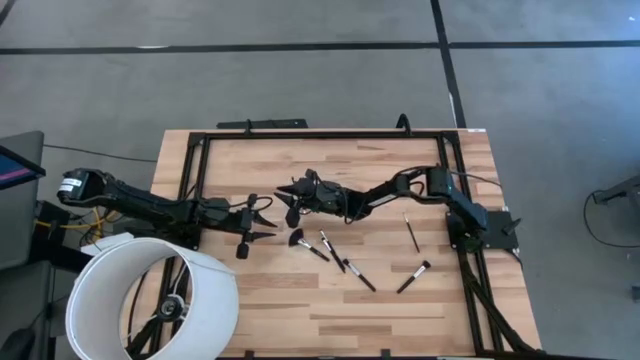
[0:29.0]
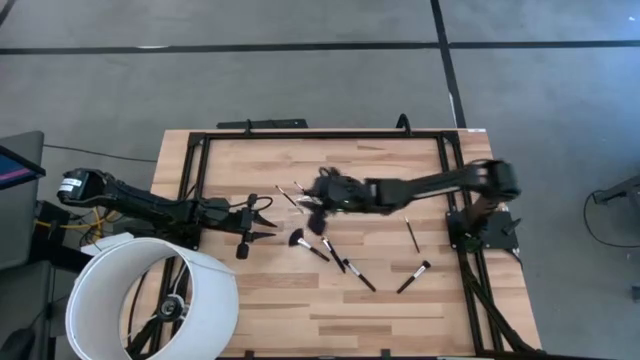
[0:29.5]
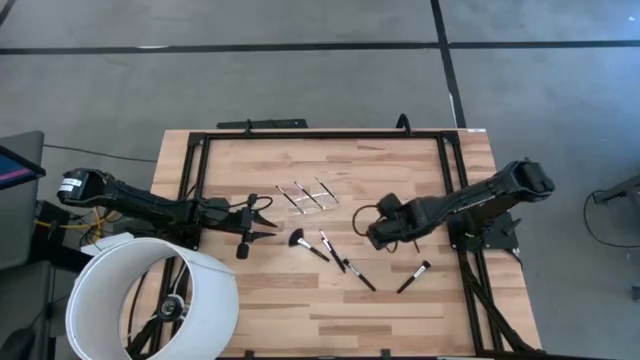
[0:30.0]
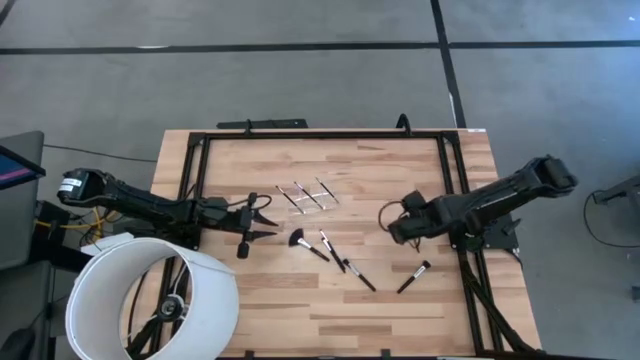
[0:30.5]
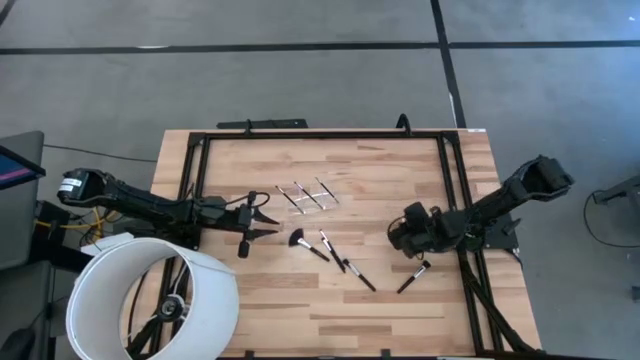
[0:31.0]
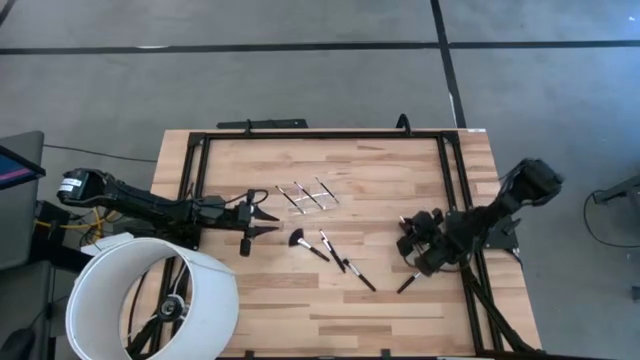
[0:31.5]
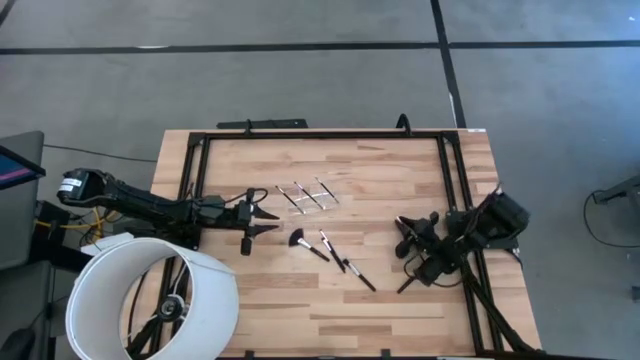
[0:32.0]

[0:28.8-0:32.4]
Task: Put items in baskets/containers
Put the black liner brush into the transparent organizer

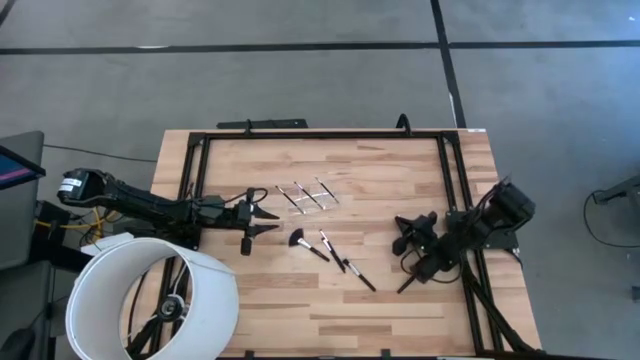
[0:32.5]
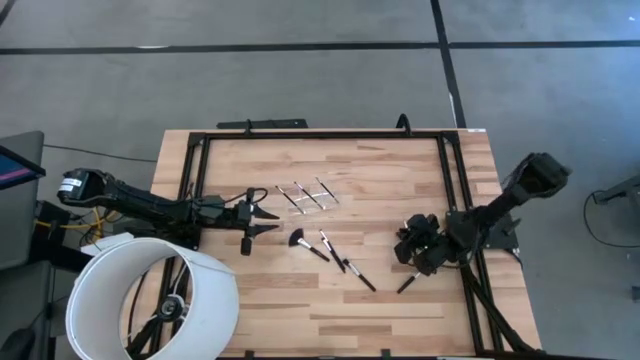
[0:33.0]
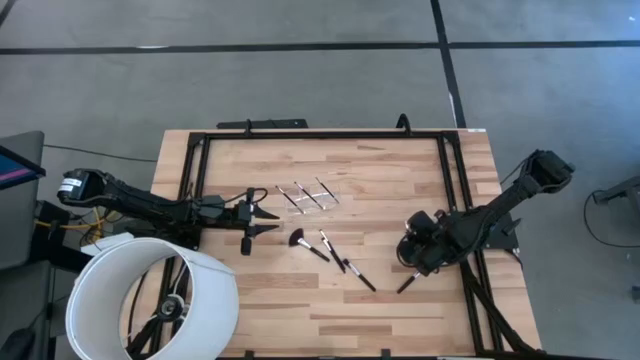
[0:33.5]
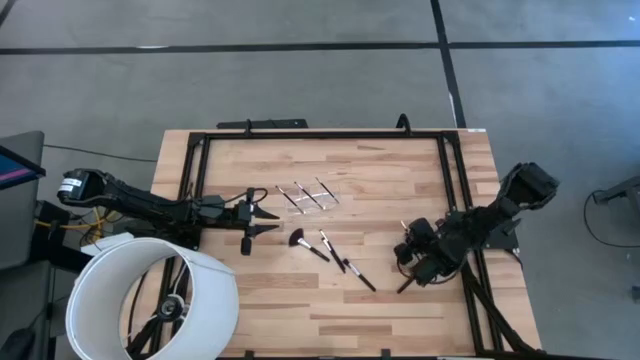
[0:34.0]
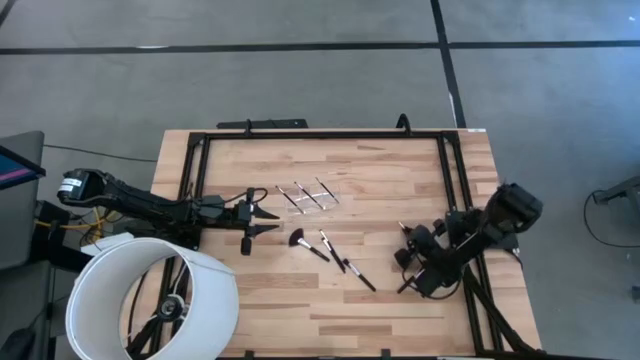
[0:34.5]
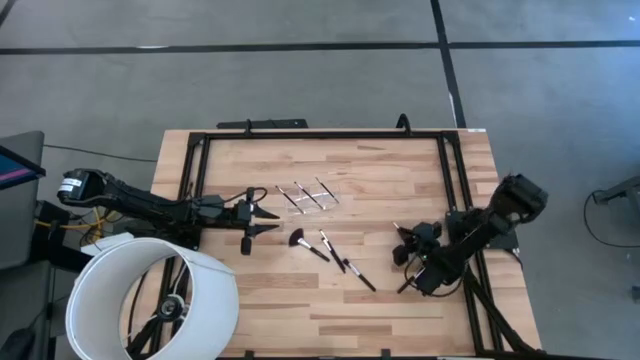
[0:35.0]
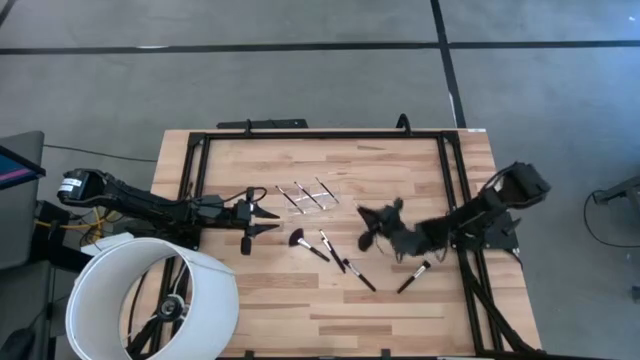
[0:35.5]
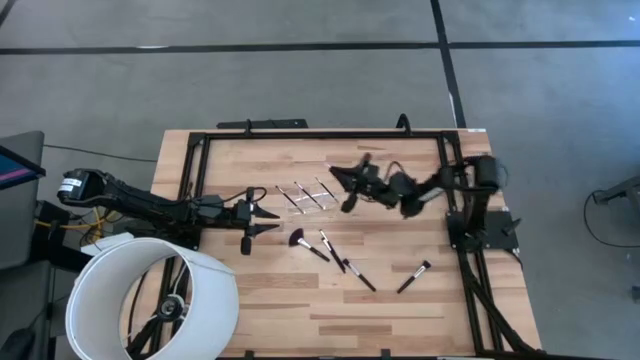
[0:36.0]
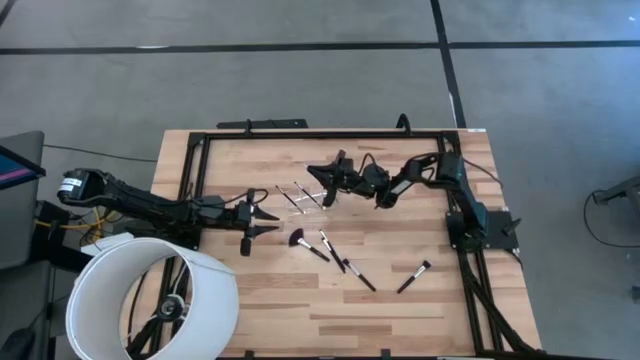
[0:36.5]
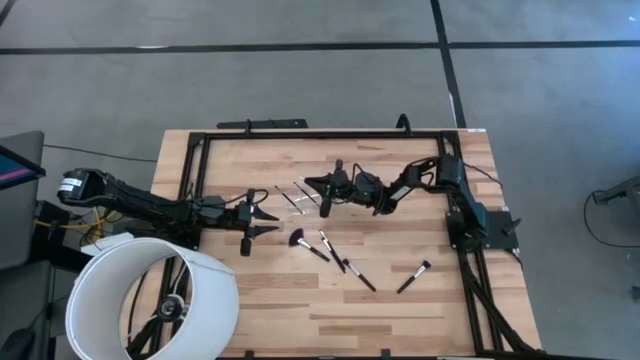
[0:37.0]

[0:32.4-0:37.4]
Put the black liner brush into the transparent organizer

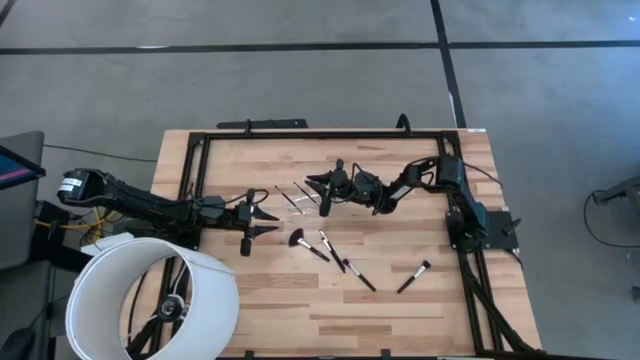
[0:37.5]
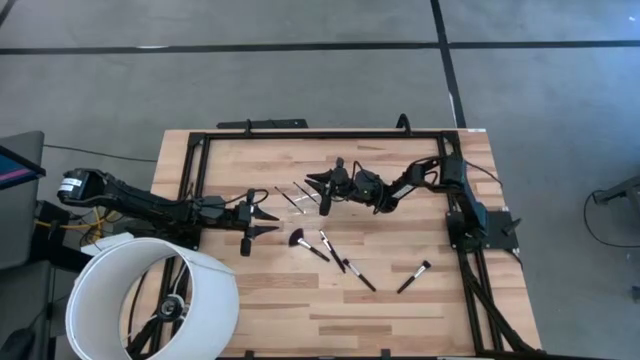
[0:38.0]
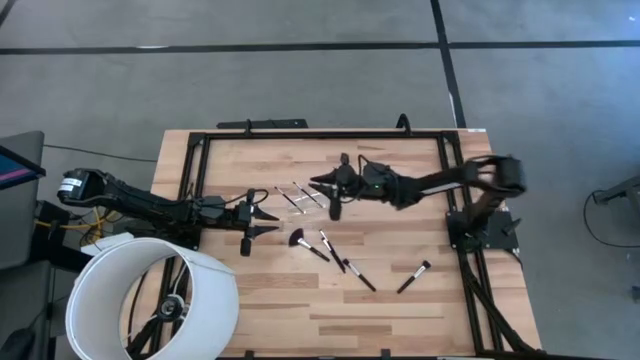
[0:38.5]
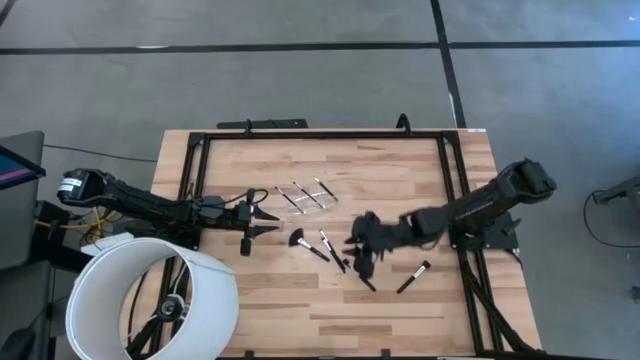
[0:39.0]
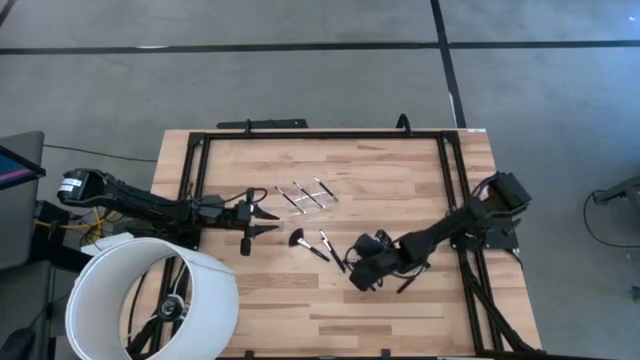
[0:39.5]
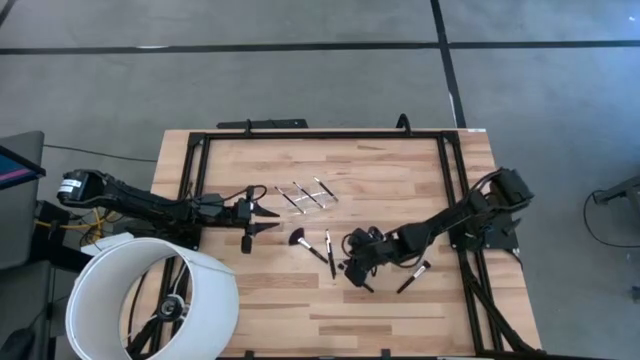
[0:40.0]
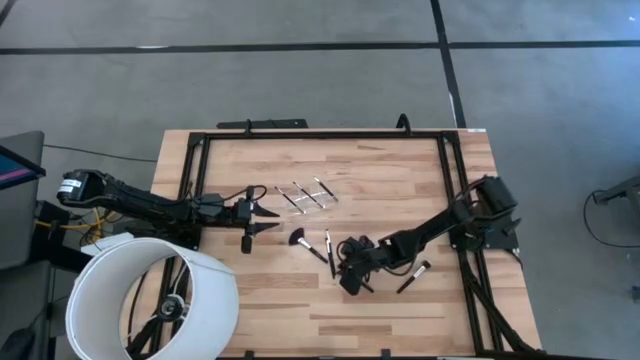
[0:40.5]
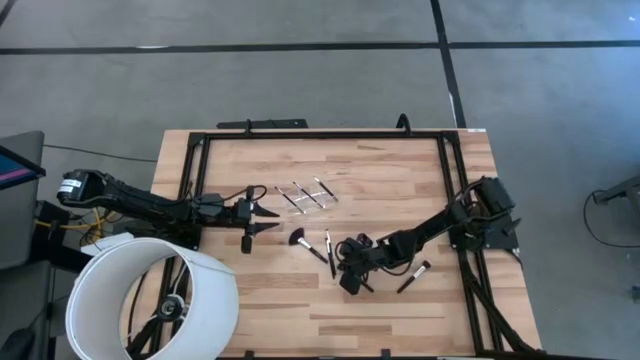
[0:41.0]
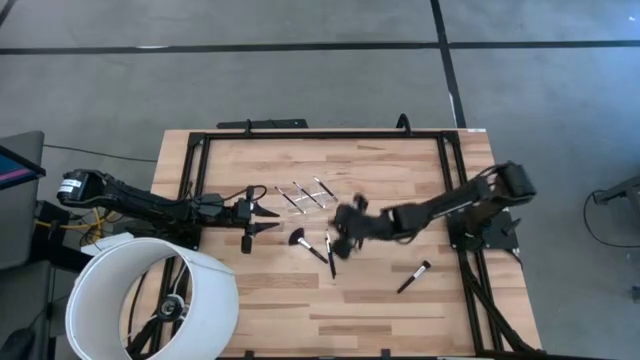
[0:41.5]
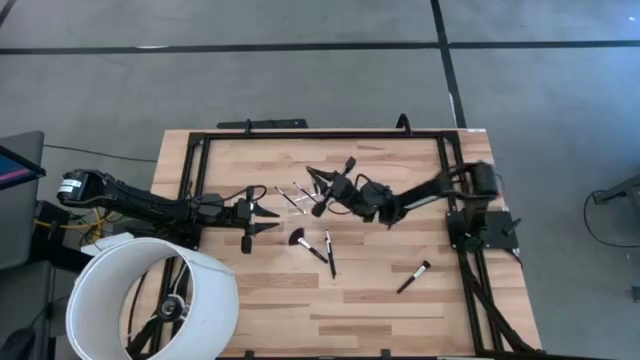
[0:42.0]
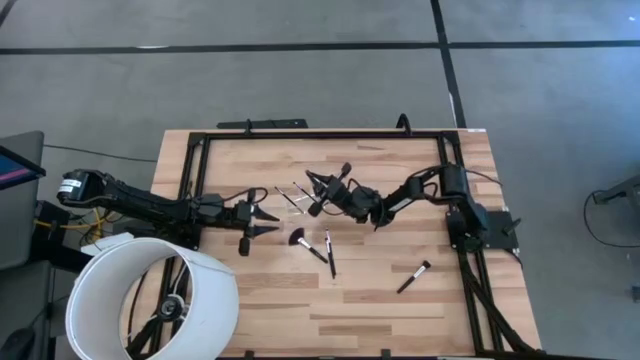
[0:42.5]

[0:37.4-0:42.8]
Put the black blush brush into the transparent organizer

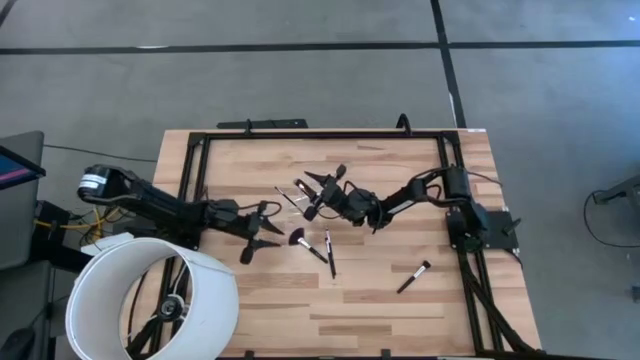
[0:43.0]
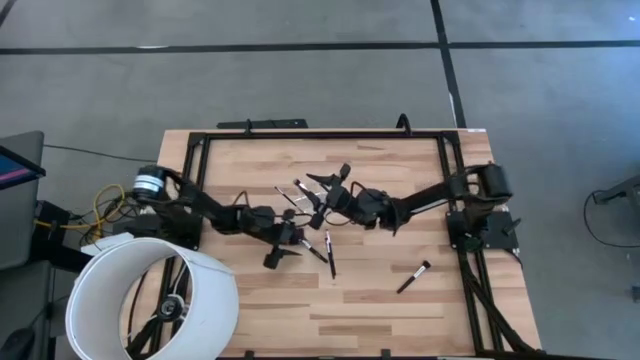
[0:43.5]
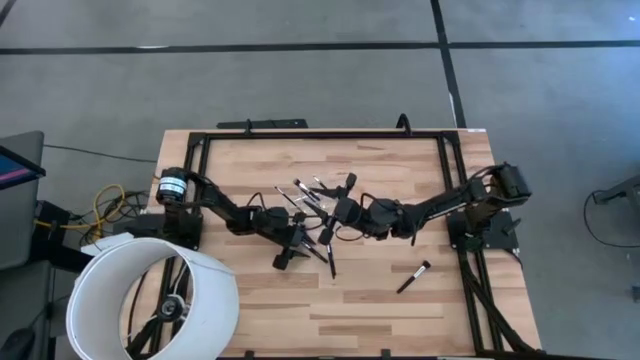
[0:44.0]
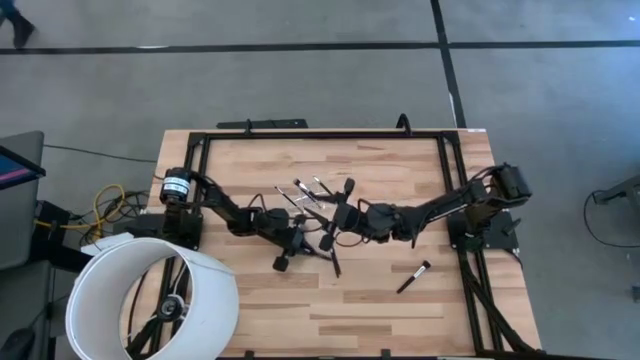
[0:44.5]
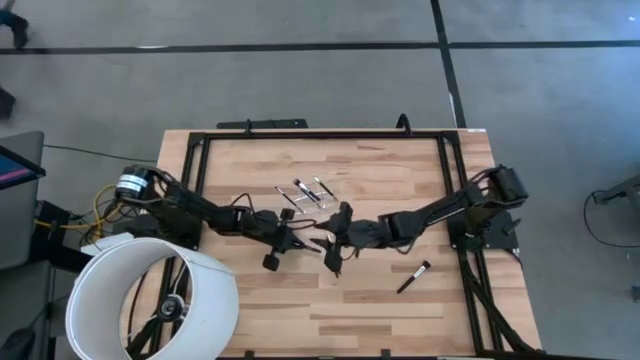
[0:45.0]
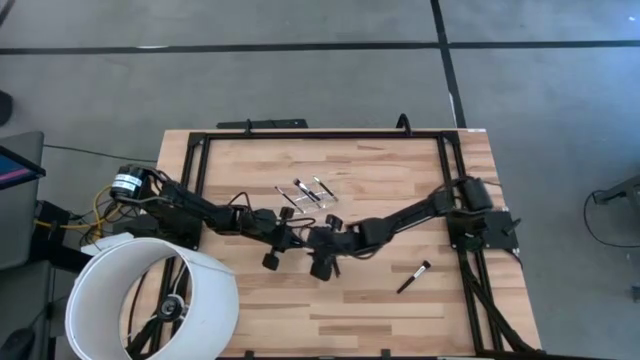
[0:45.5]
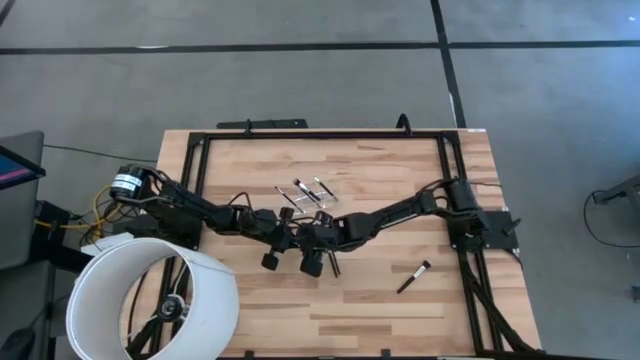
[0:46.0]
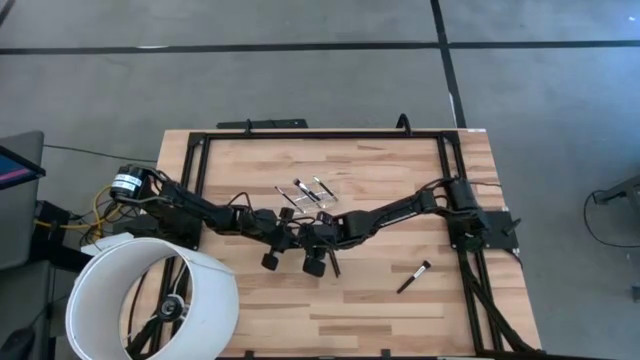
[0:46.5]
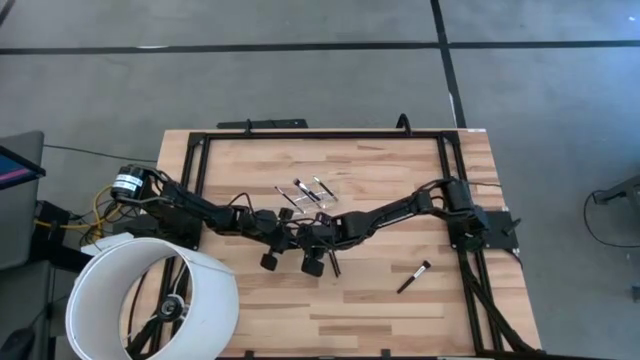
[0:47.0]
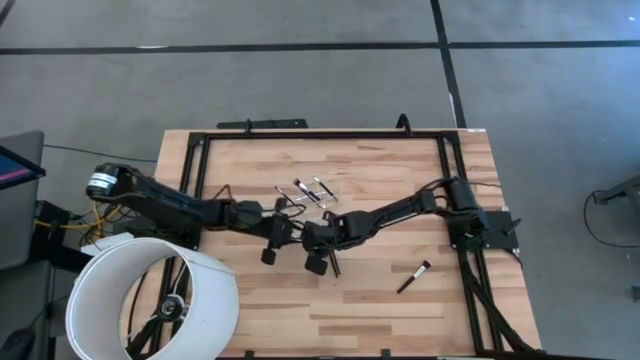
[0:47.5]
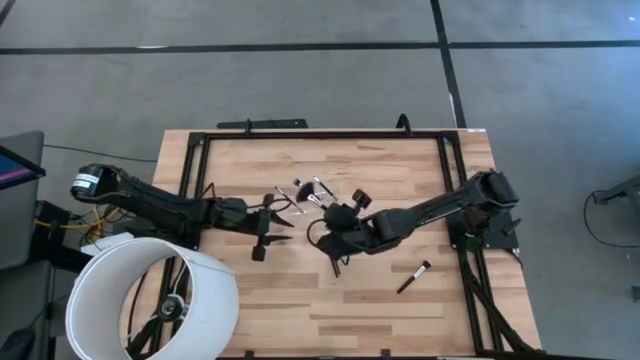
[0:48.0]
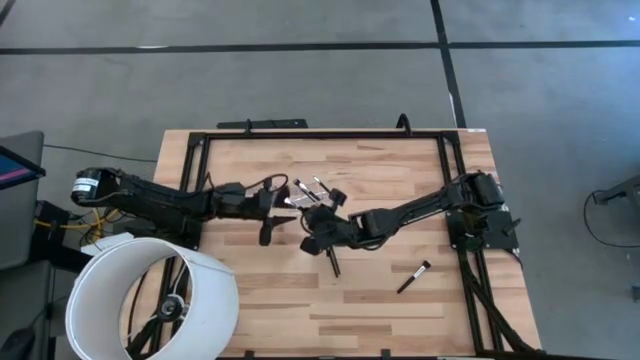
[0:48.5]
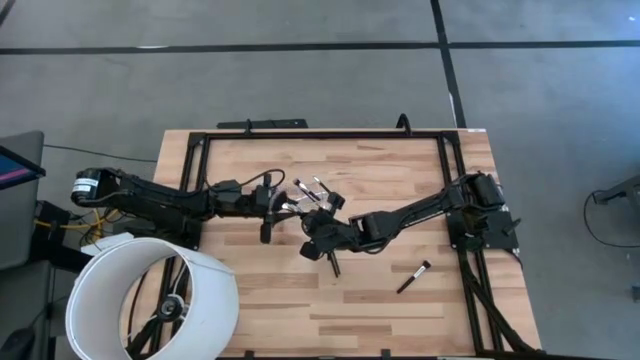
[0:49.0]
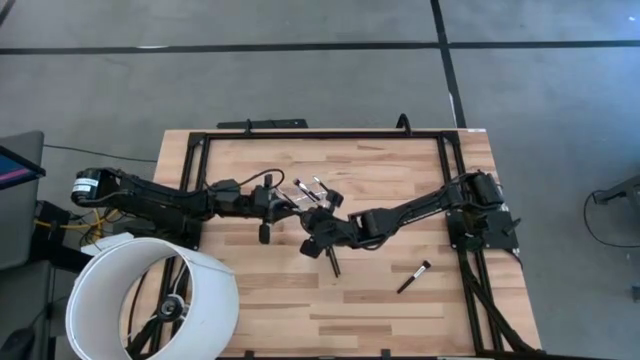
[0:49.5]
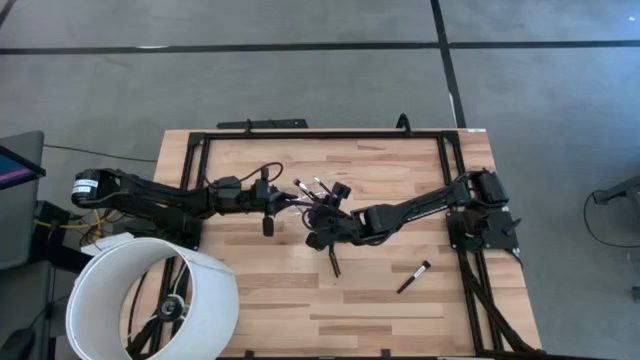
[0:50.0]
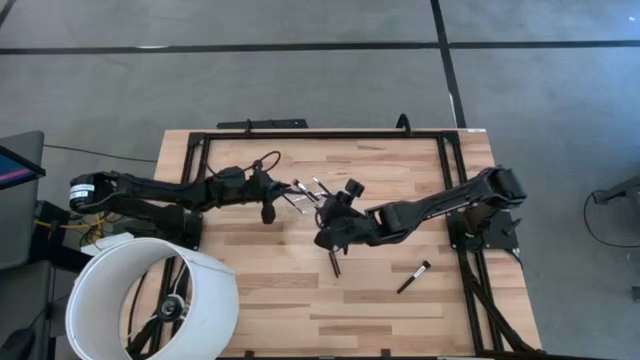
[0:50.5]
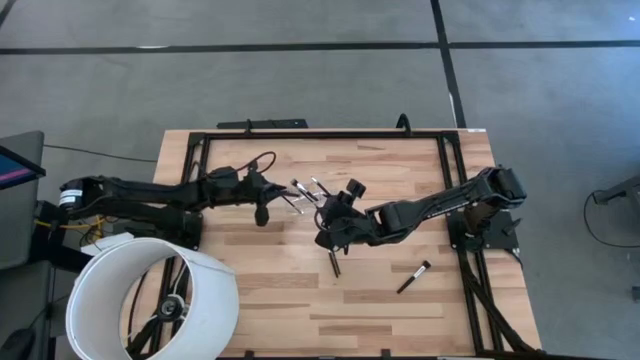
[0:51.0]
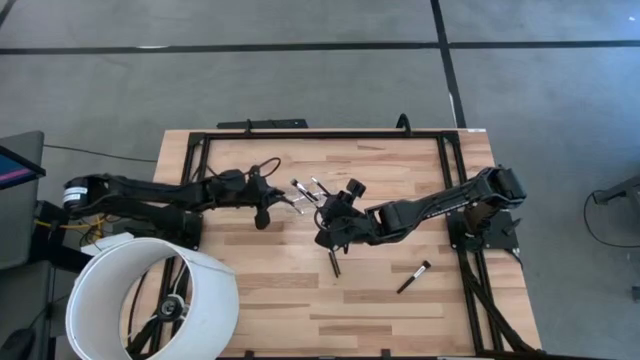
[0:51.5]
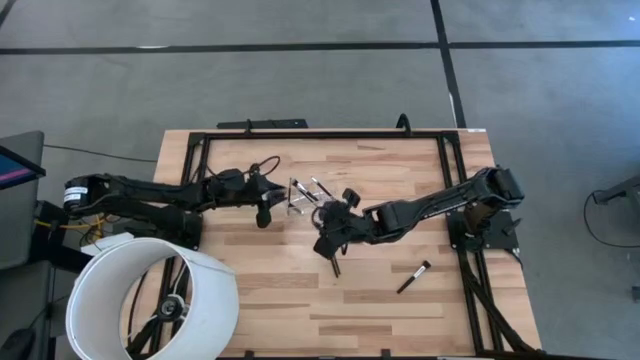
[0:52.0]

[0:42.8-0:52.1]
Put the black highlighter brush into the transparent organizer
